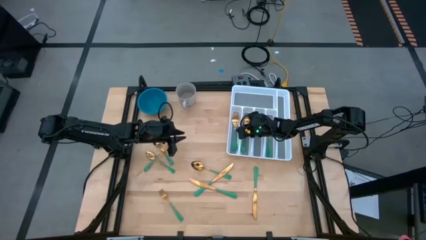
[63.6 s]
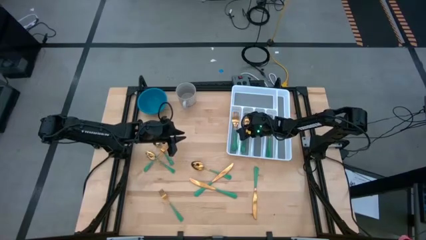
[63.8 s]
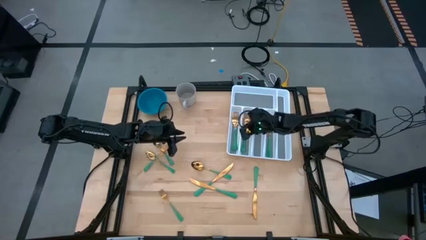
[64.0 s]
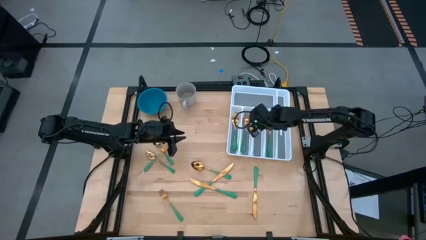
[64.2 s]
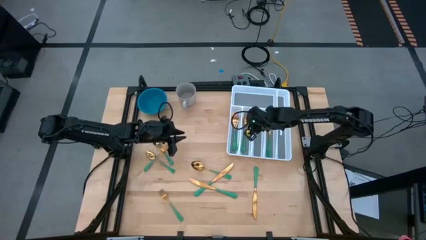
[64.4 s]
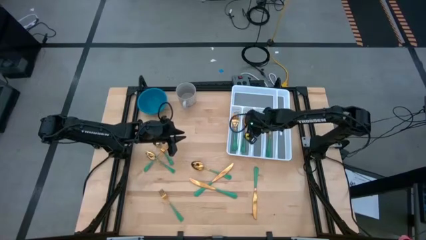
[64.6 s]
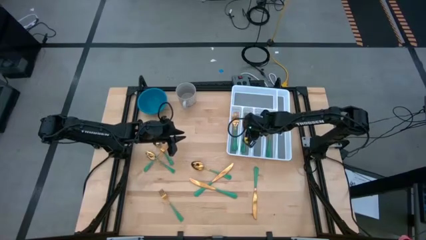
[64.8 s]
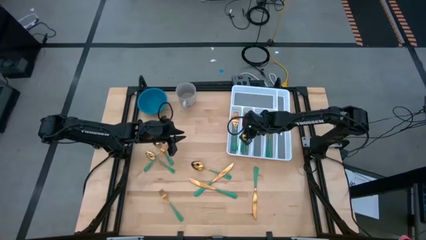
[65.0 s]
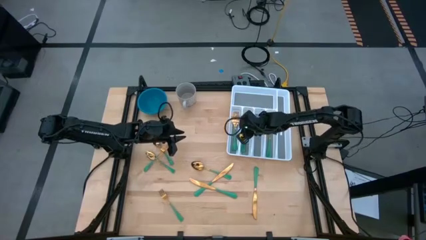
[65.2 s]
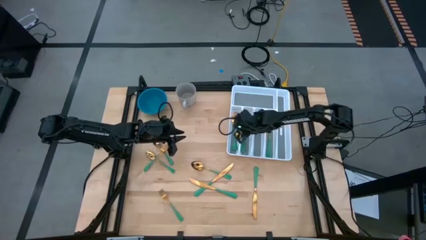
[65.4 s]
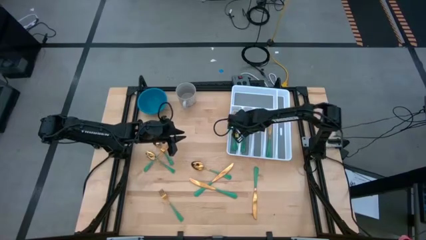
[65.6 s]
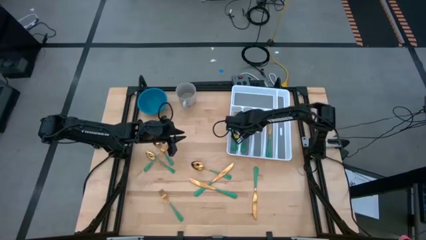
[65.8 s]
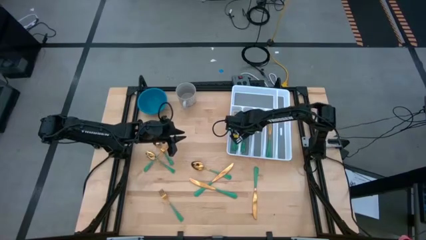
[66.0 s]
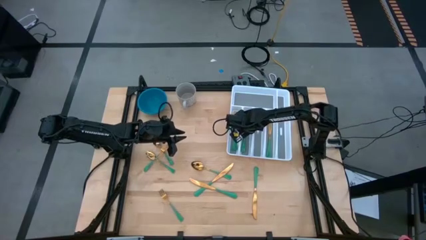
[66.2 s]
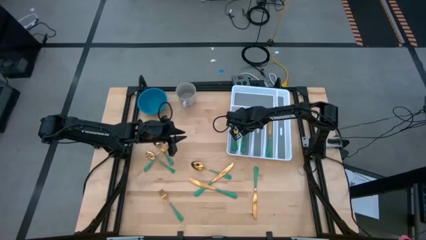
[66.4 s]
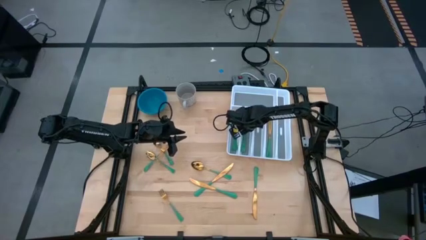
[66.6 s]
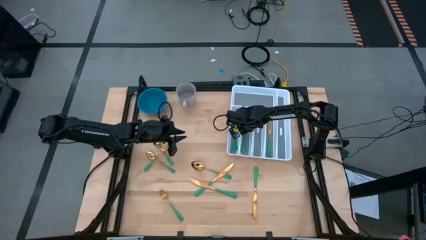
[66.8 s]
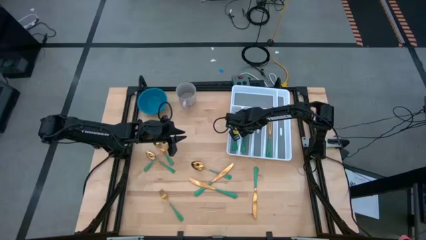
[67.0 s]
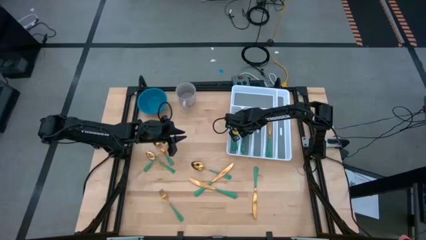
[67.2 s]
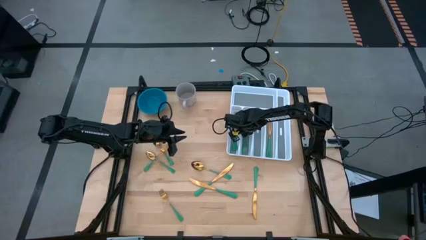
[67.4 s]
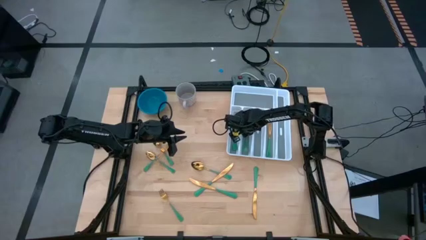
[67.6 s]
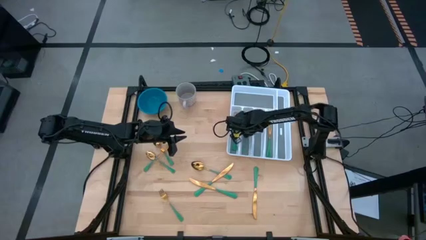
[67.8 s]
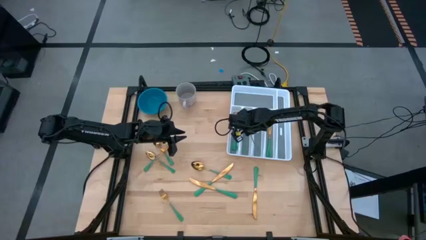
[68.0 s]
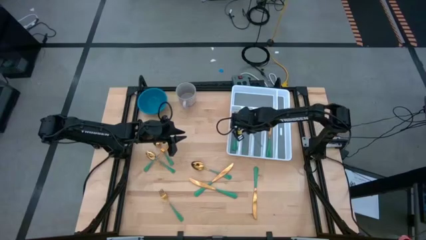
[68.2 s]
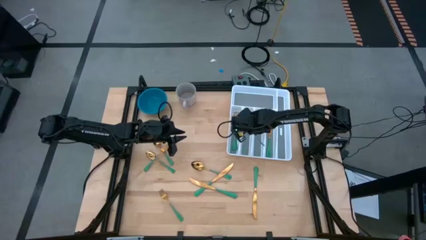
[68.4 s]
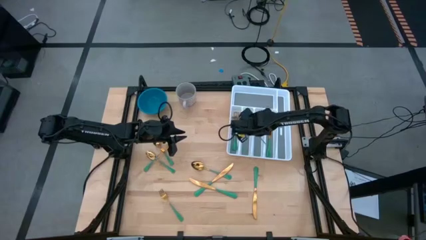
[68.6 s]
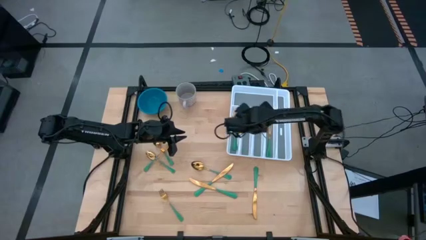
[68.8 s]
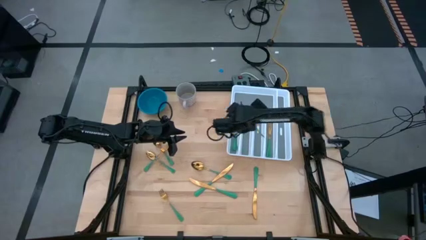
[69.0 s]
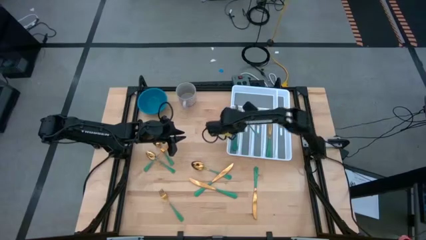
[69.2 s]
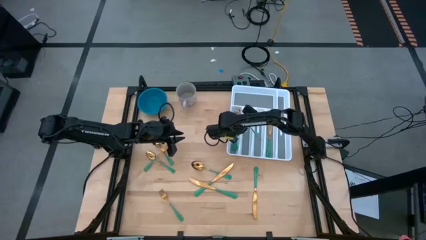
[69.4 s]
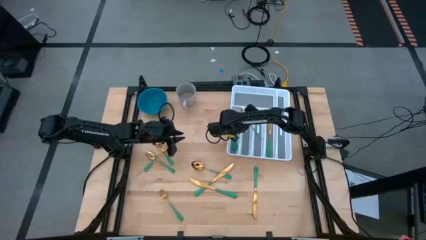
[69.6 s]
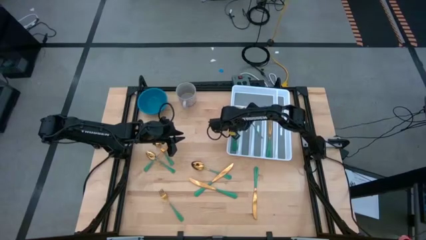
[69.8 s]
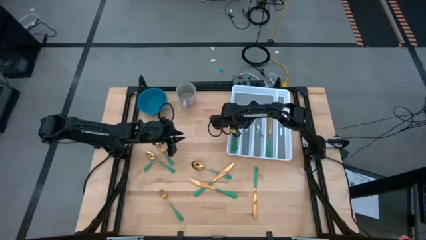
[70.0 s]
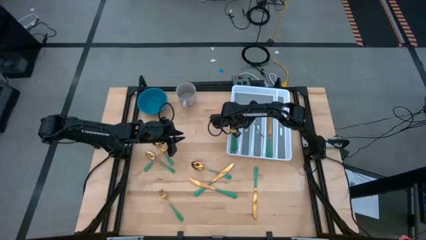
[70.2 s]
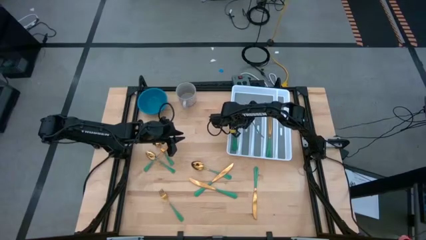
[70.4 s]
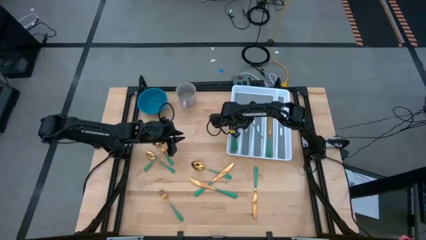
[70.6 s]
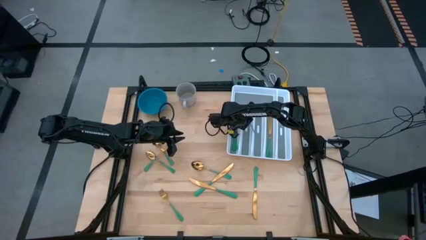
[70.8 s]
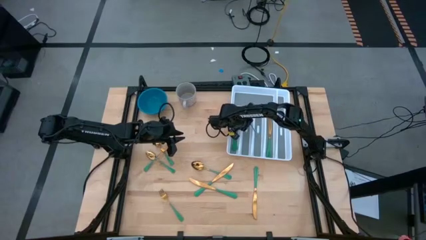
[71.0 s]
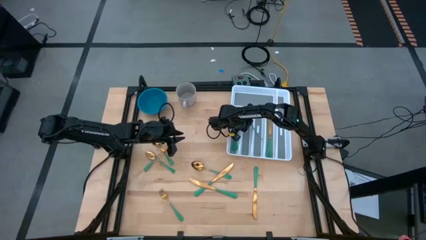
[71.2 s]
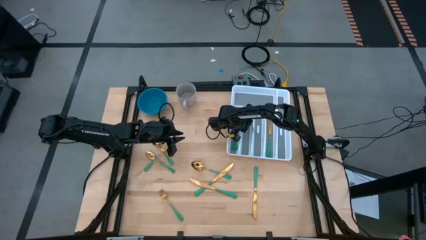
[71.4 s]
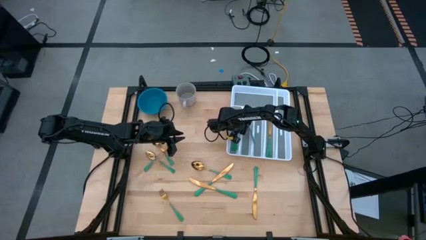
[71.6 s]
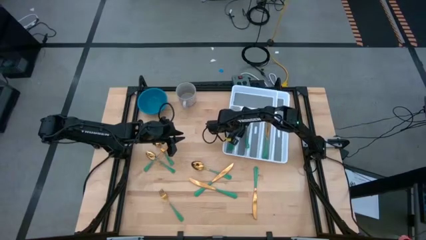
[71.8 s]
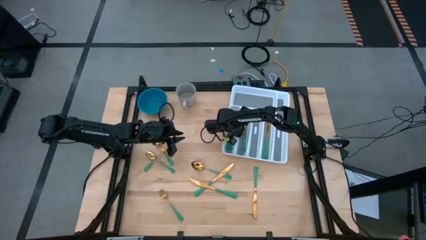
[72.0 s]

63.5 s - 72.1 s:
Task: Sort silverware
Adjust the green spoon in the white silverware organizer

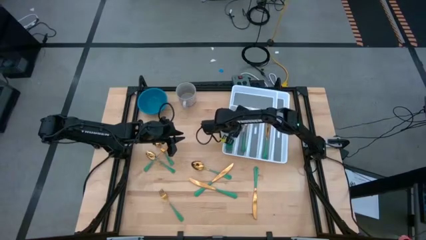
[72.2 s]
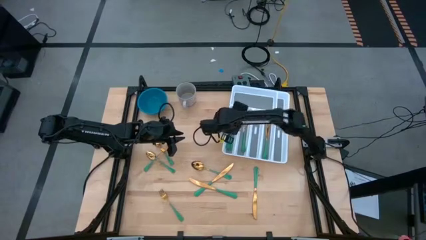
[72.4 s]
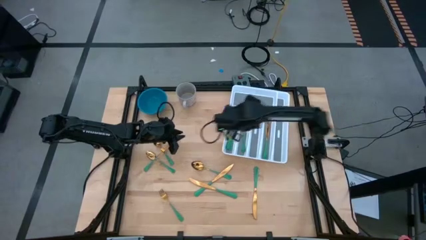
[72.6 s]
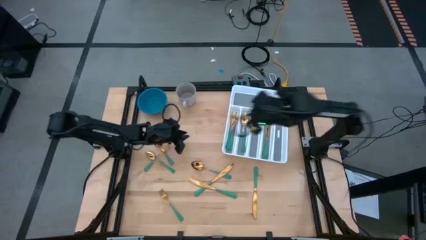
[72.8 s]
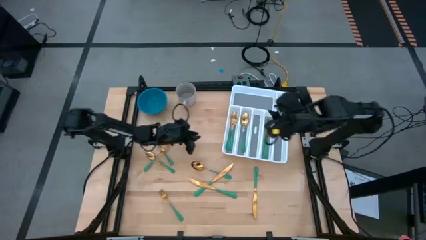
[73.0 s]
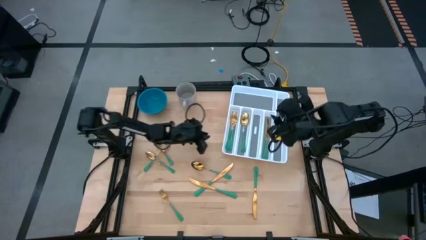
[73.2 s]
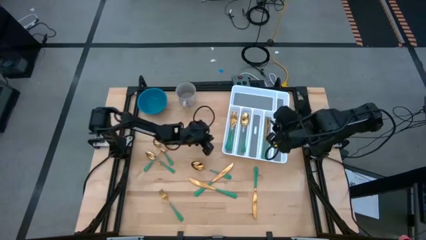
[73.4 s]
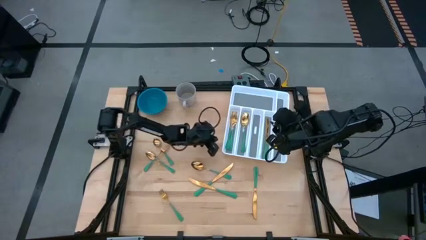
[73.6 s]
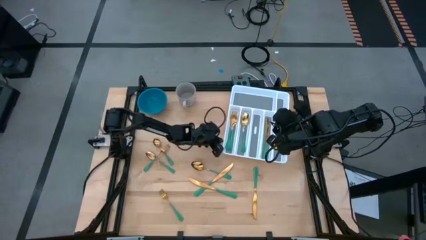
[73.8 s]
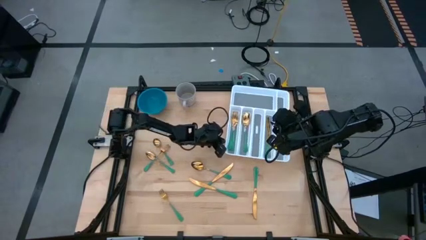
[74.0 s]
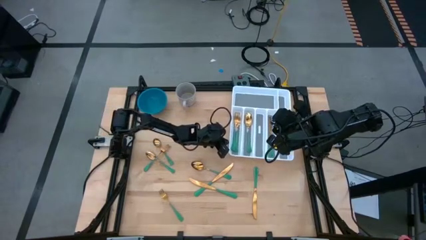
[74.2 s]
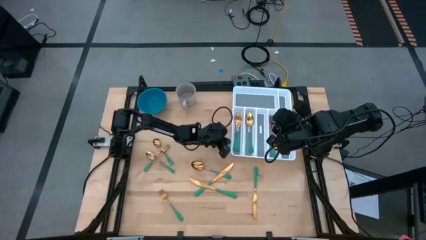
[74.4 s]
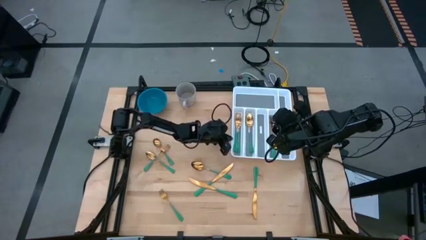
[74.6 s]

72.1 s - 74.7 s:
Adjust the white silverware organizer

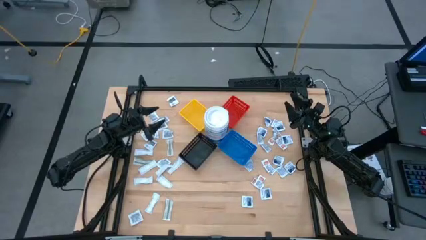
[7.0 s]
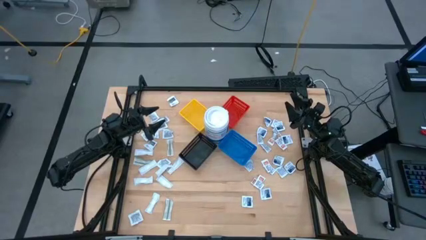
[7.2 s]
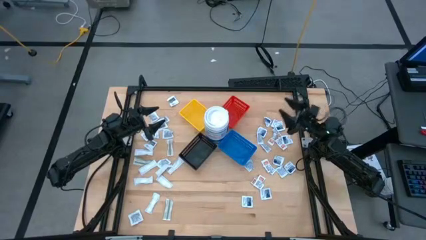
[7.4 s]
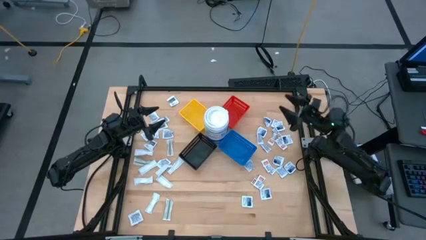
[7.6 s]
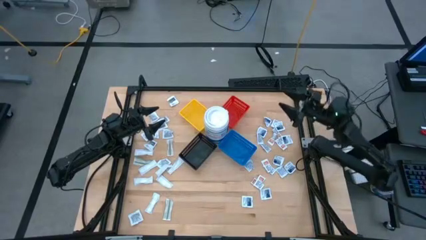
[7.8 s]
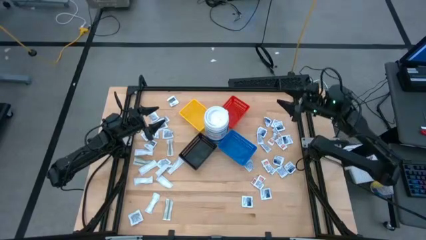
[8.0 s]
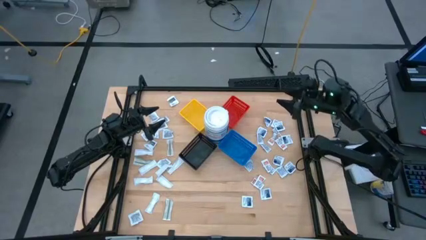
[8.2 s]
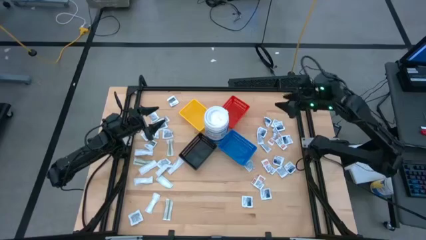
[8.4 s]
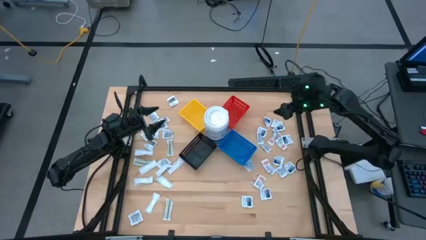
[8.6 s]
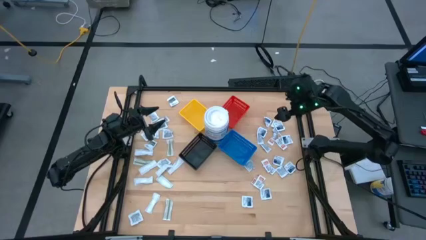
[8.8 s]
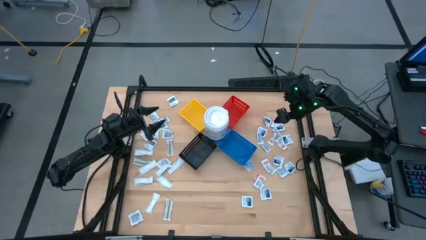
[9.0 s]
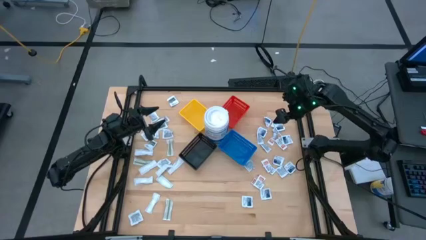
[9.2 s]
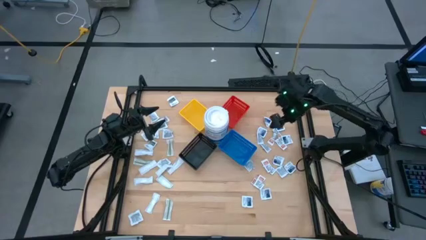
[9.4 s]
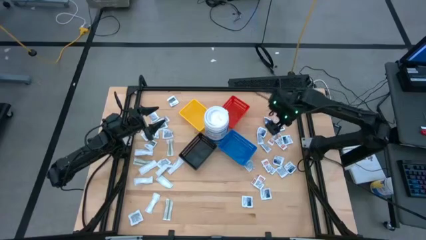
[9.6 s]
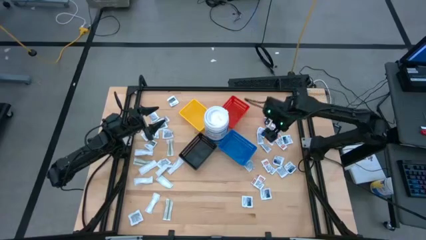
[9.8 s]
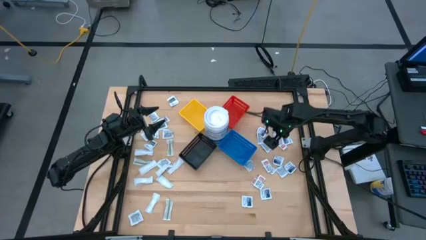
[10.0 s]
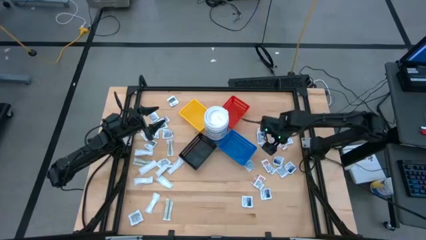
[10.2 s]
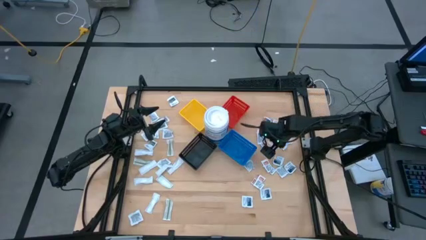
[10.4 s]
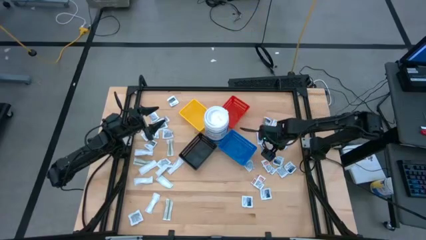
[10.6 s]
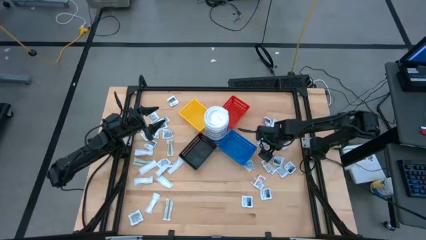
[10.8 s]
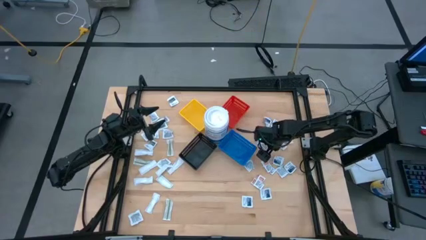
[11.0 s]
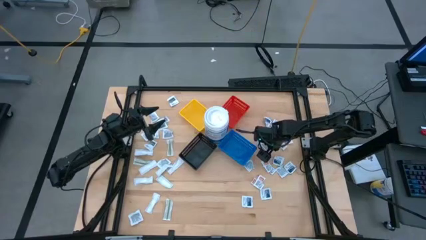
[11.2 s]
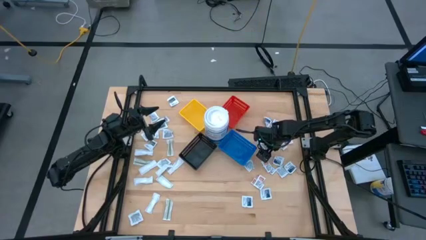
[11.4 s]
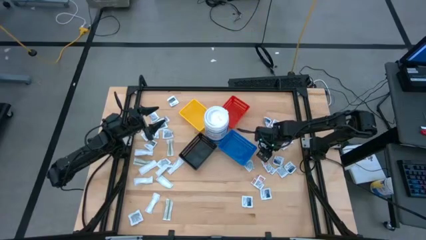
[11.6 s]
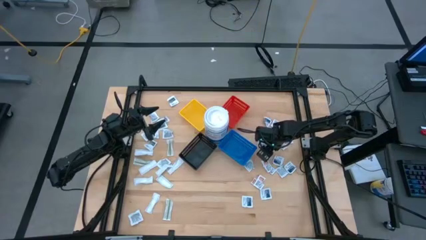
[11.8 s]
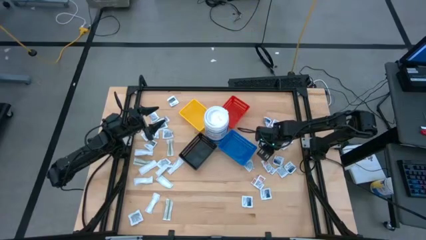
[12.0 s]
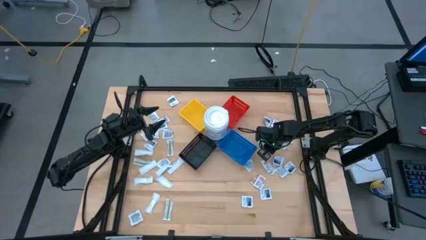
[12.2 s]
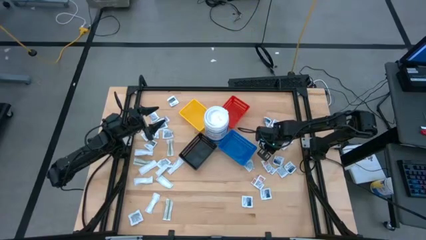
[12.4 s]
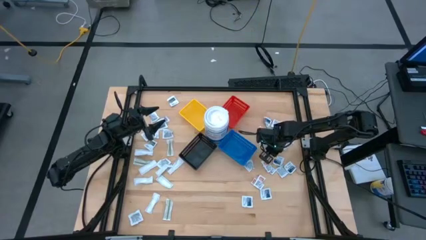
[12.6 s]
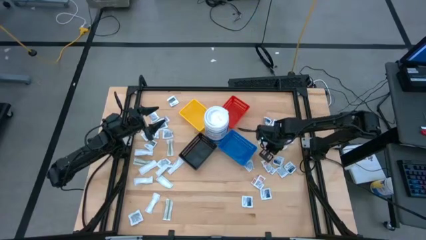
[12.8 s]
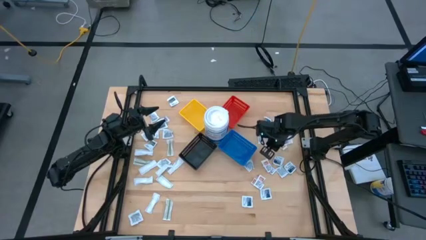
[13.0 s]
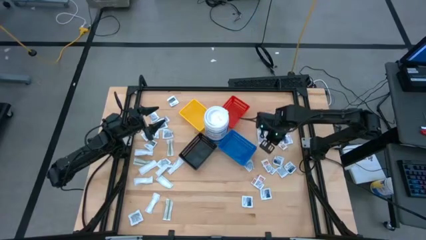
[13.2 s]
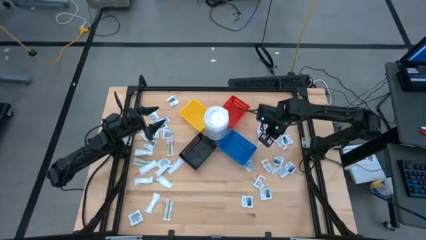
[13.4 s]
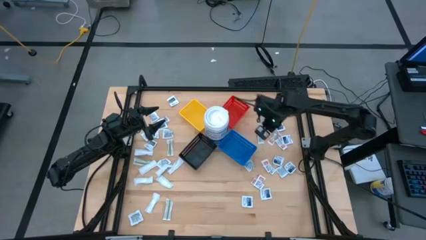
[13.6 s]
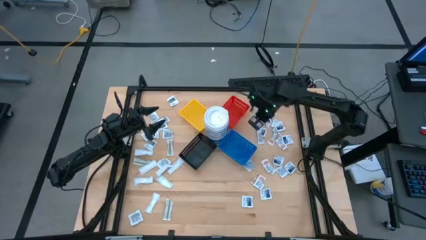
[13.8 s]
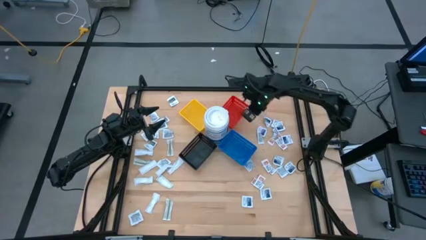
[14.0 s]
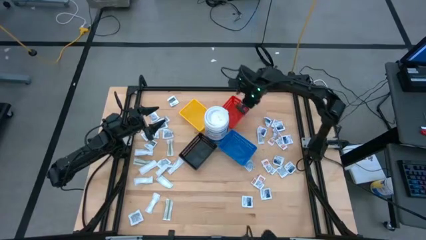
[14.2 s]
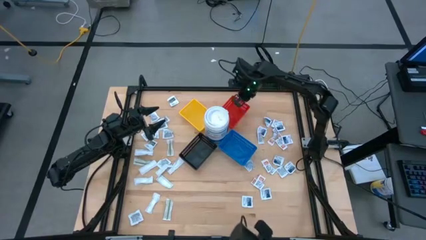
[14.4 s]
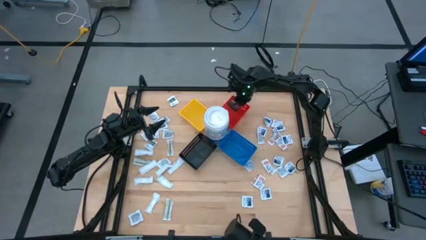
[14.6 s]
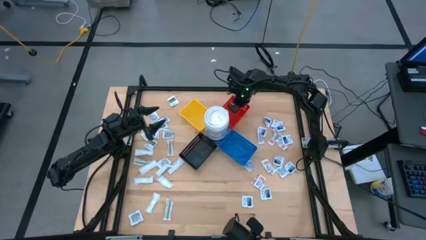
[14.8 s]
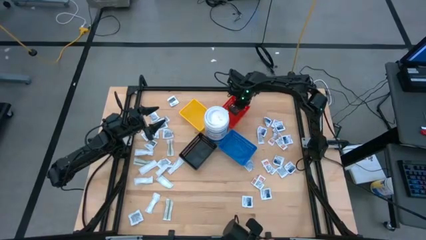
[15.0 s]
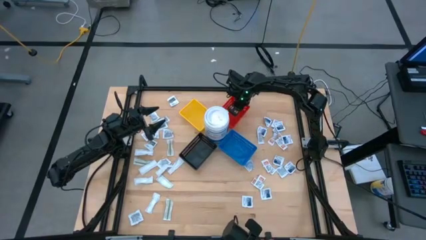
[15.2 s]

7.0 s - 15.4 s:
Task: Pick & Place First Aid Supplies
Put the ointment pack into the red bin
